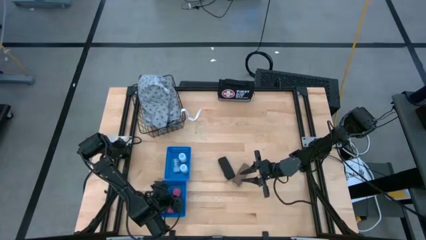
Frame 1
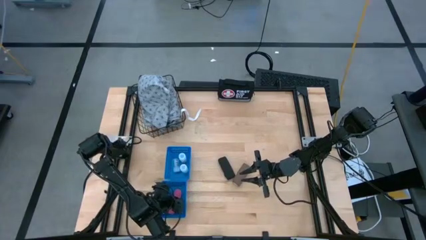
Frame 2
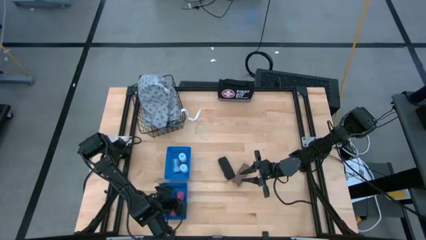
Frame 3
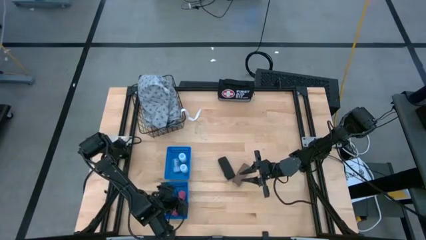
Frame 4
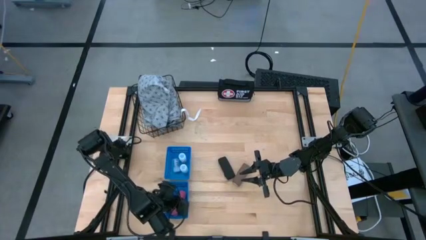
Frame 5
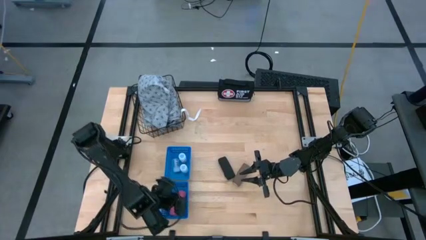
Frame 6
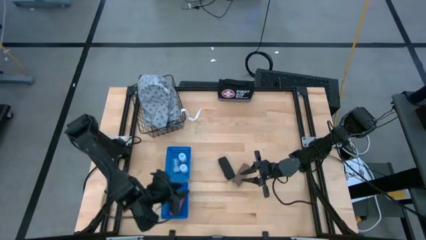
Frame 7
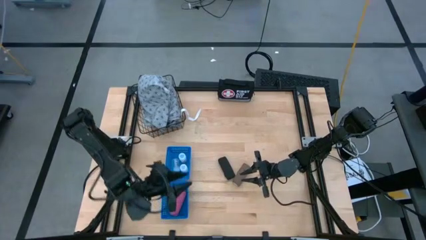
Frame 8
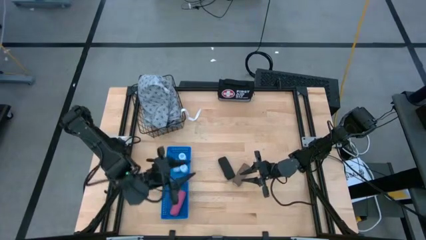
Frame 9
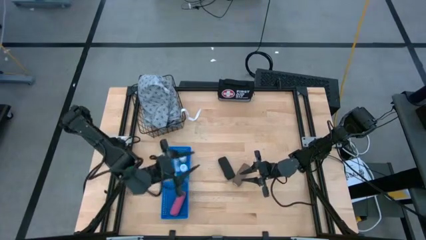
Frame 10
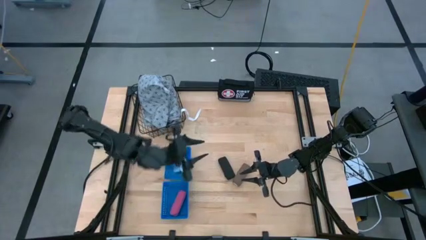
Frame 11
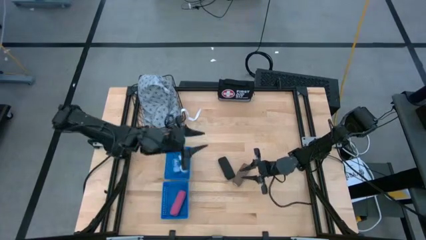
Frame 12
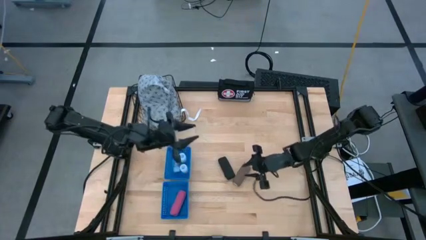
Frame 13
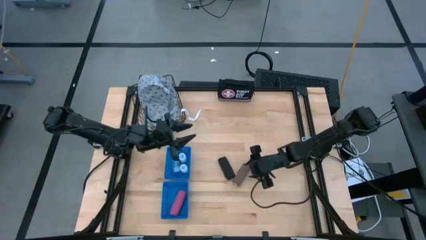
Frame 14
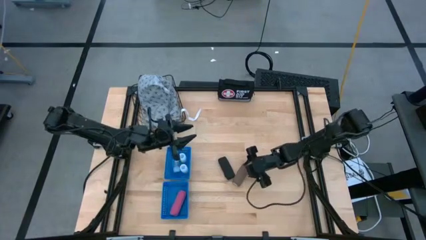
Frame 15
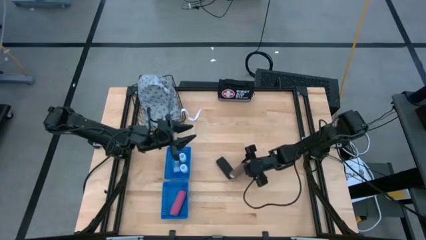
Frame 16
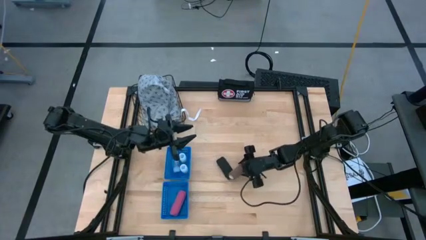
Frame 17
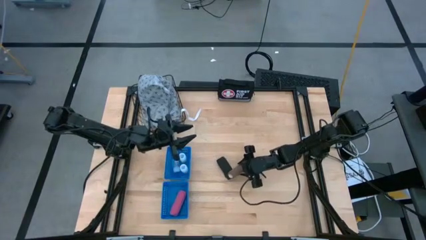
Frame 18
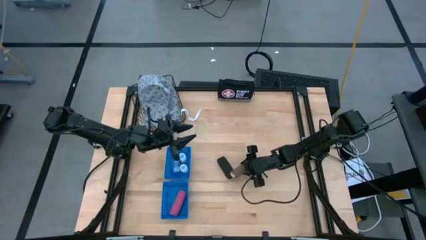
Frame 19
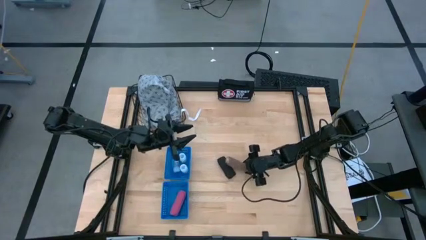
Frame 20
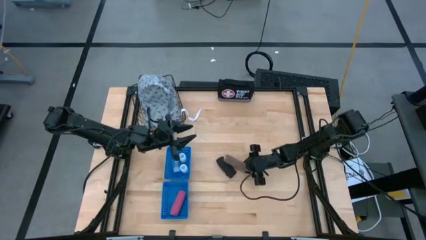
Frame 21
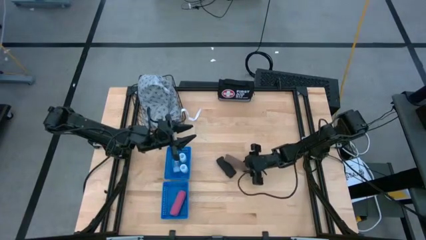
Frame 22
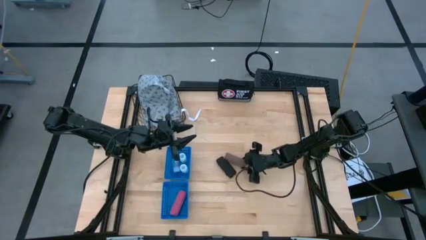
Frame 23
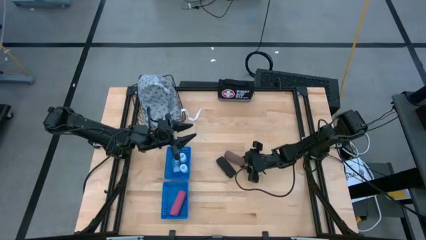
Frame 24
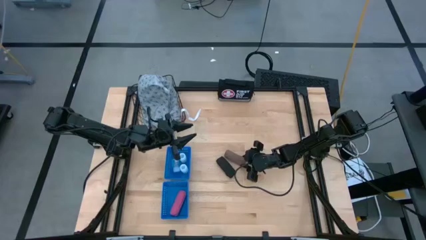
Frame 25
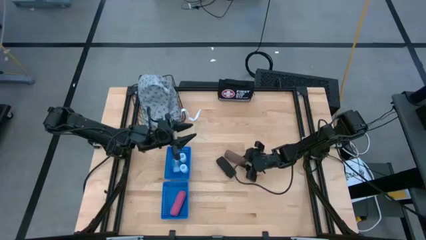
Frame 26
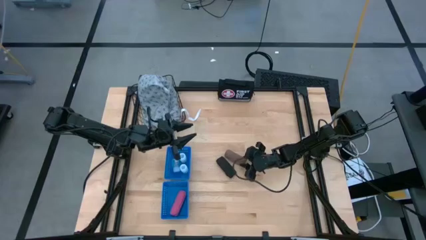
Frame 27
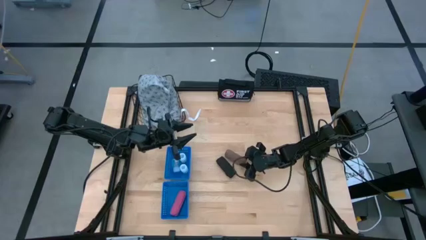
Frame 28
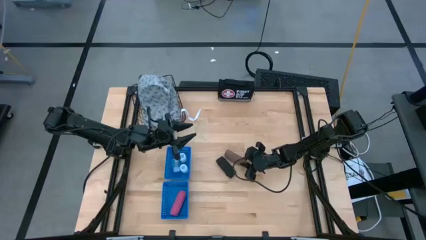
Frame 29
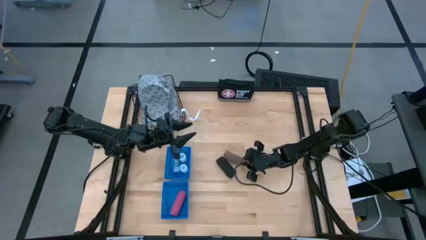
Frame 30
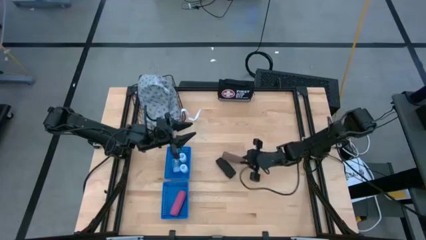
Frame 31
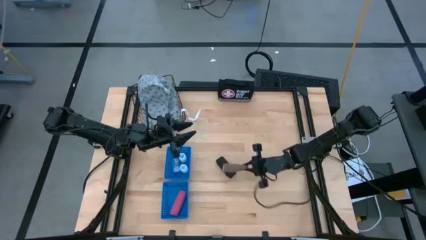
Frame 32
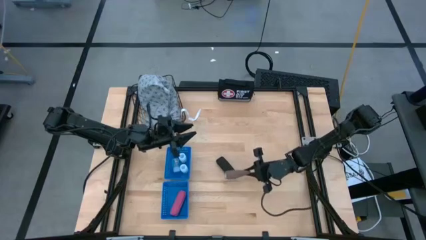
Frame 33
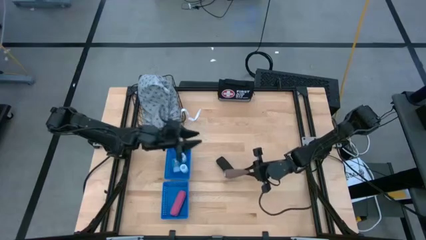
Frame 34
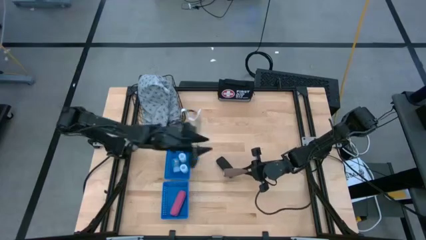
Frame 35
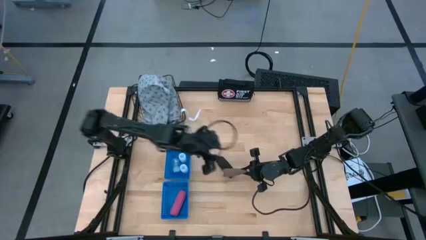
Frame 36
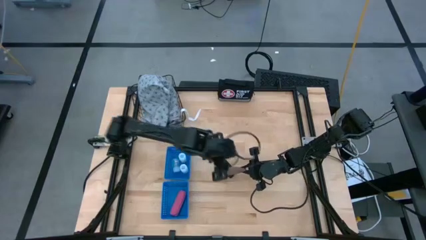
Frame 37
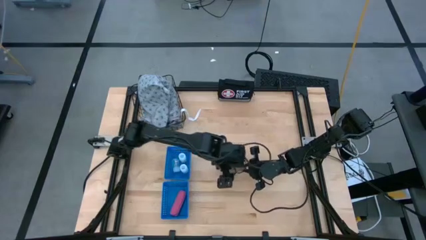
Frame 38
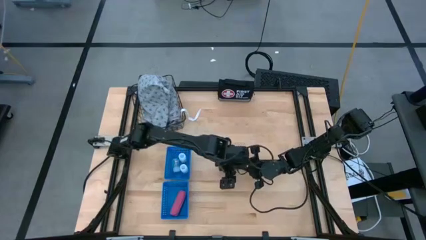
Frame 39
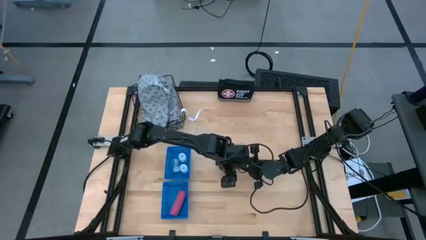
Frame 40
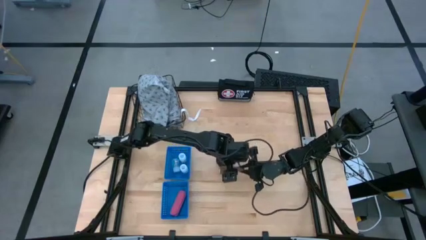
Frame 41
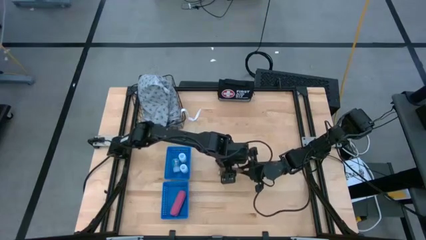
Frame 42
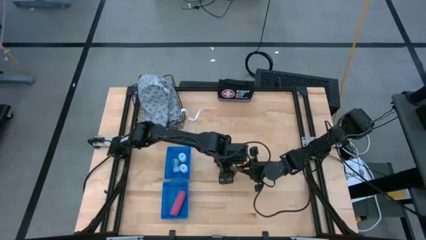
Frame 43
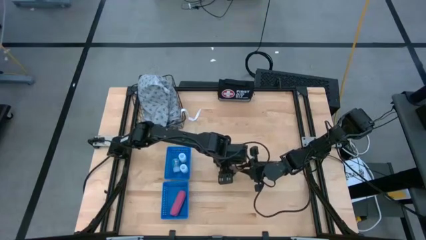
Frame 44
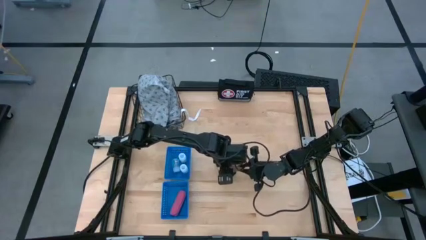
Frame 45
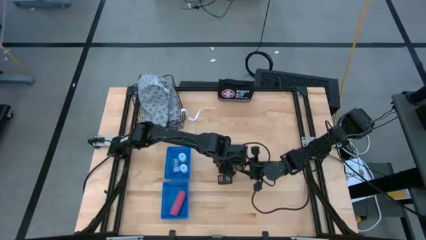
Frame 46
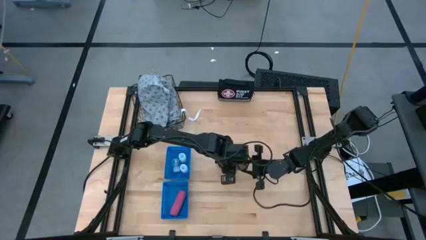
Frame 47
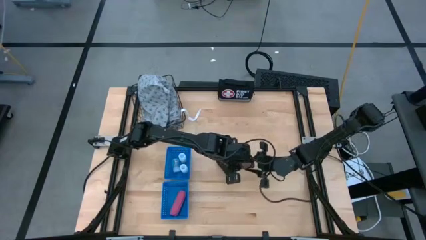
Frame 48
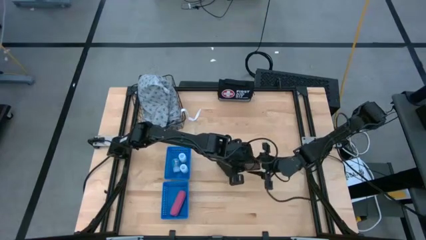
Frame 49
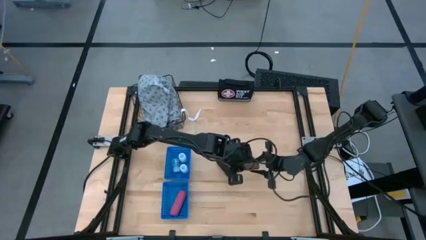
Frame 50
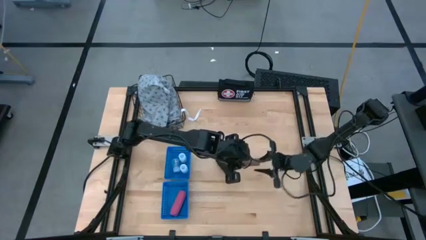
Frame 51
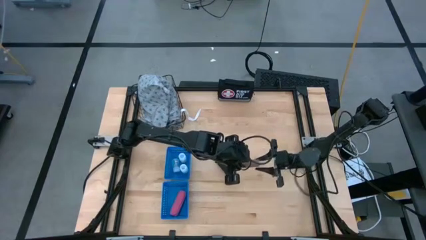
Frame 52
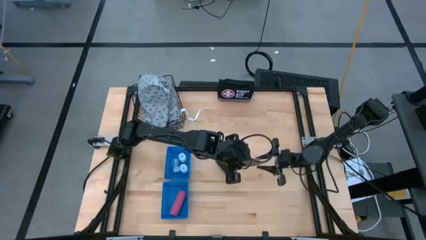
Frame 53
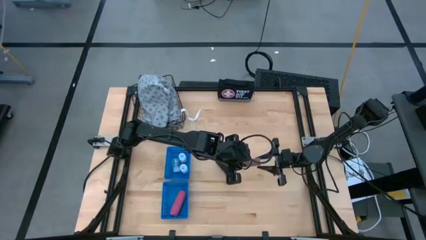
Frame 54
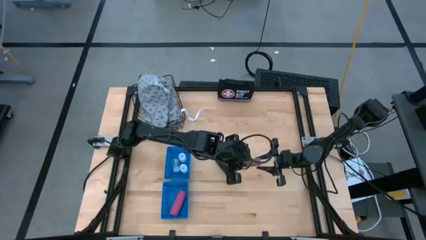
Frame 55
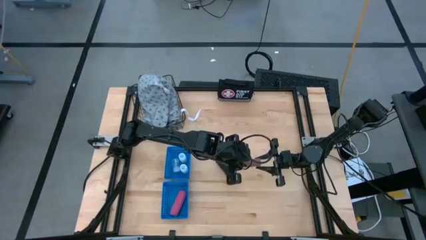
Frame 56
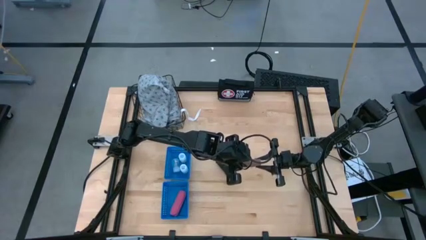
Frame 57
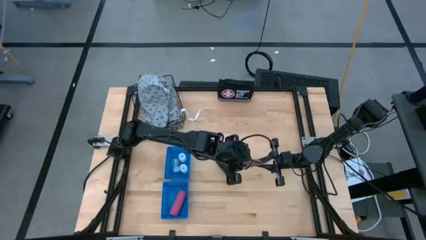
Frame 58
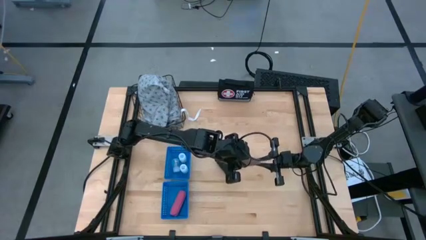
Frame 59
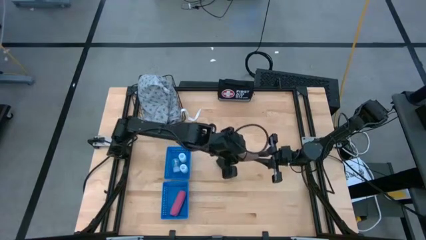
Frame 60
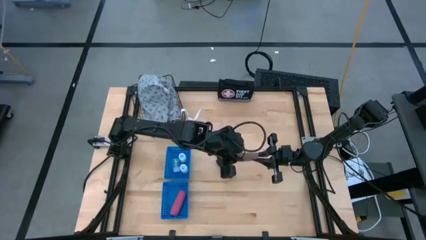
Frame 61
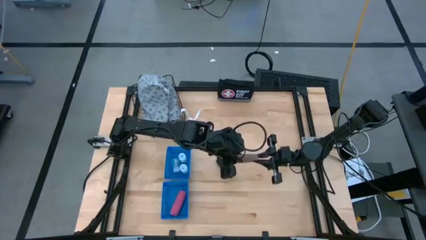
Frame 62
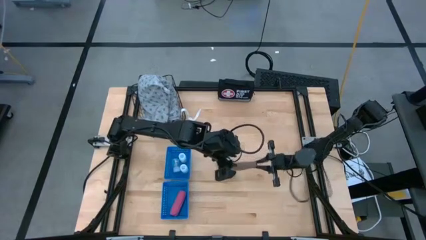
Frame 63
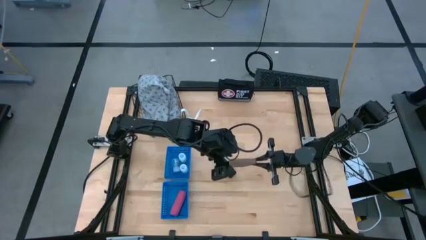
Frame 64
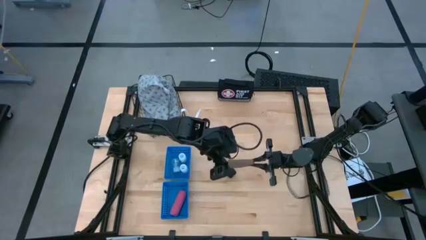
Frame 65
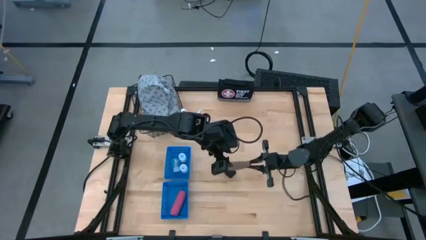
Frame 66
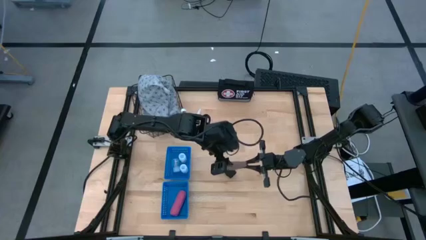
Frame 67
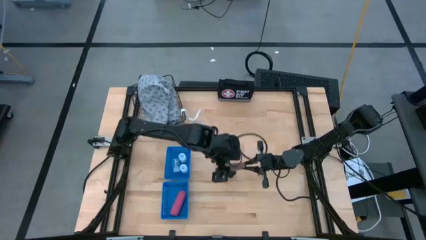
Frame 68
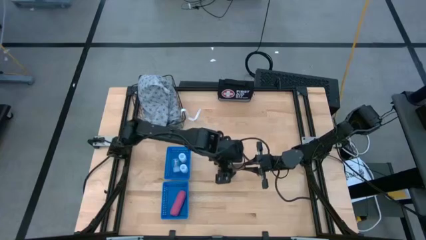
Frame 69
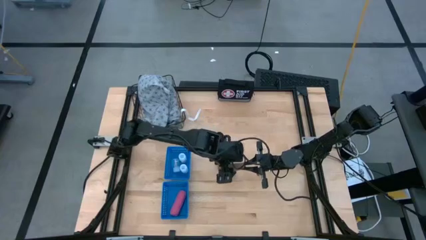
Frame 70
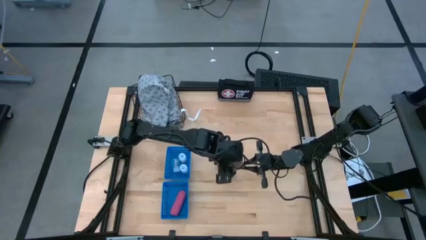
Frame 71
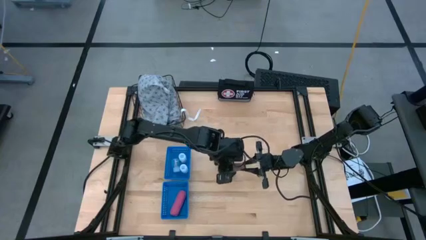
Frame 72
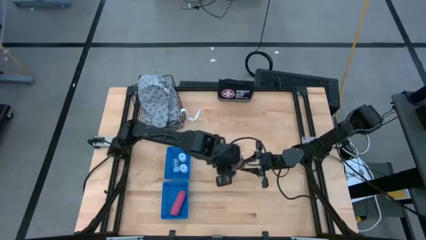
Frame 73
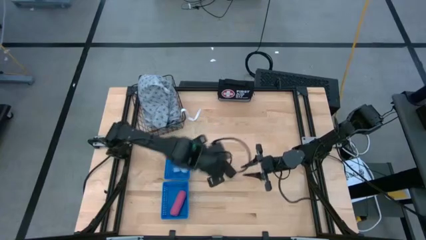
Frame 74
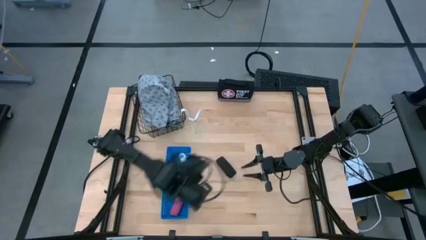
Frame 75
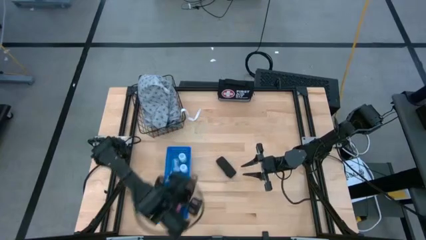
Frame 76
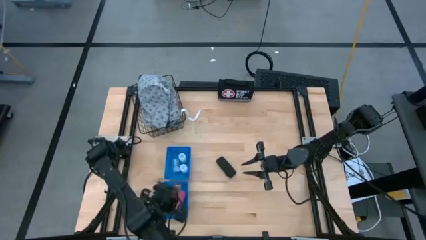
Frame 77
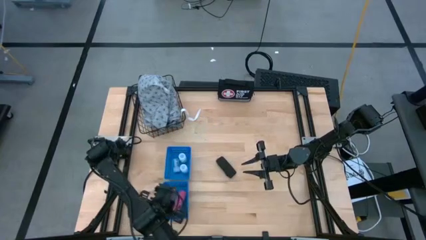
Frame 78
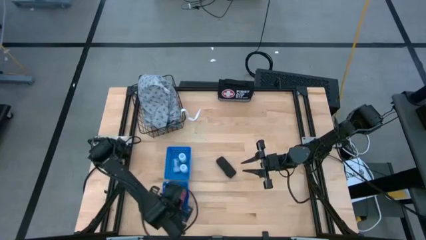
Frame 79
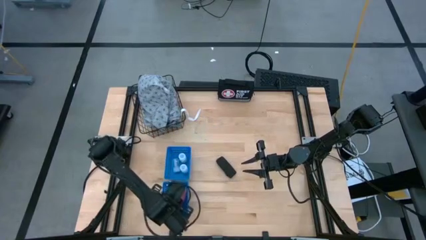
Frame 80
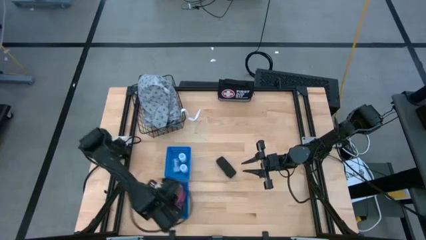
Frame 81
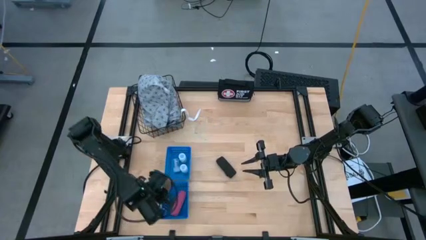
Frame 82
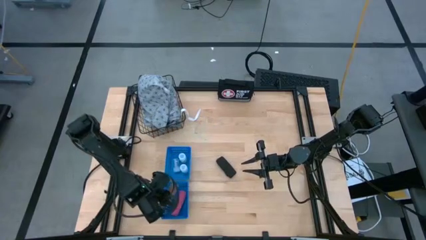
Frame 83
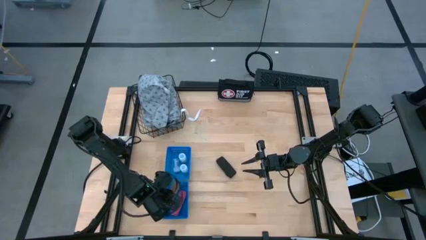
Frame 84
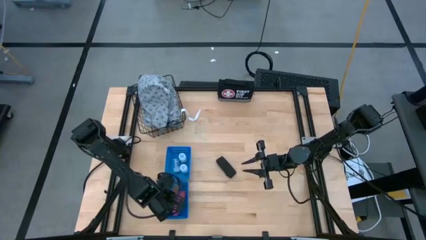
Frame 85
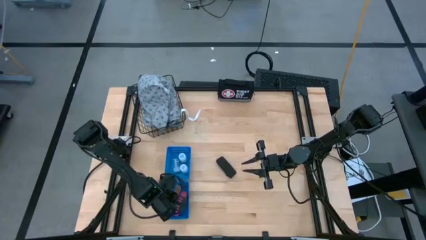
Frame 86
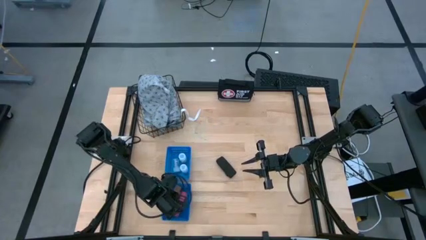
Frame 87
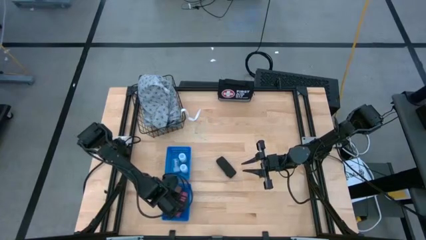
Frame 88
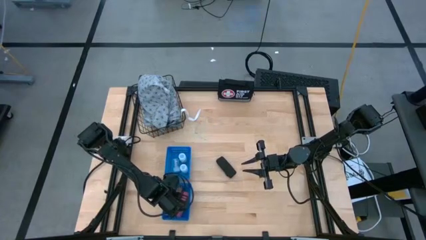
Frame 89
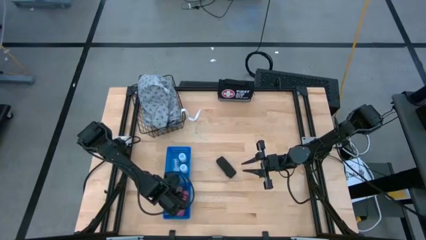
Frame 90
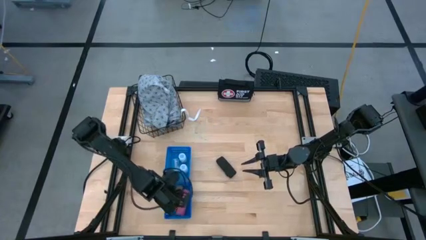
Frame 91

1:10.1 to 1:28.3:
Task: Pick & Place Medicine items
Put the brown bandage into bottom blue basket
